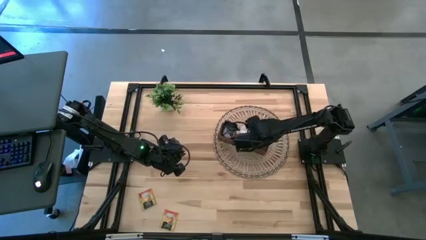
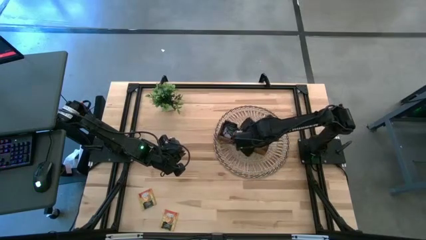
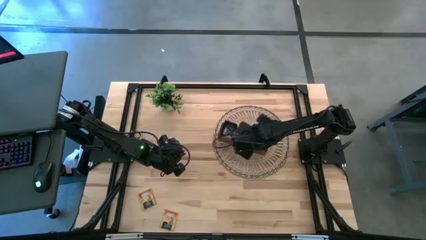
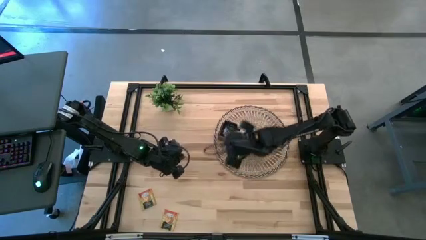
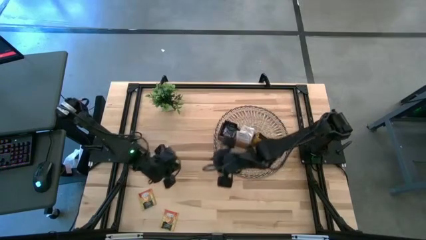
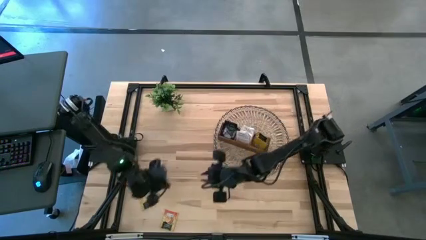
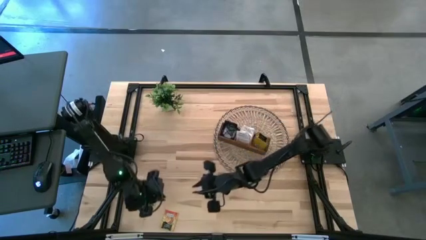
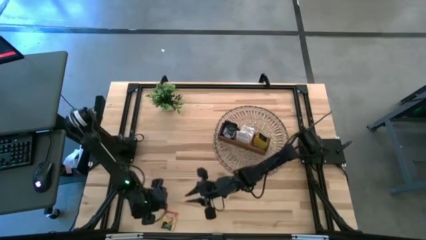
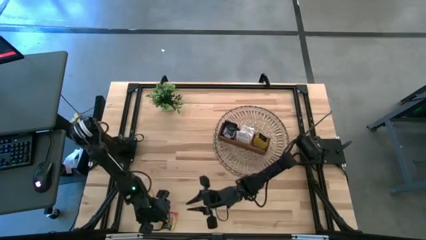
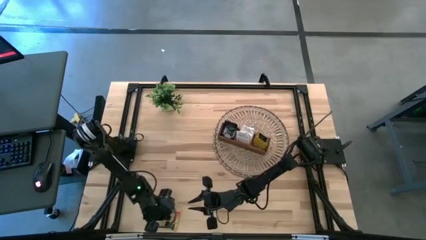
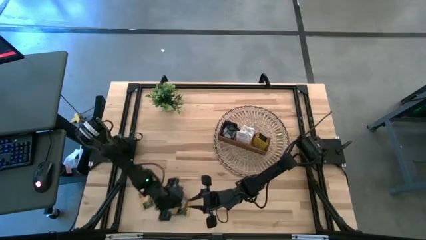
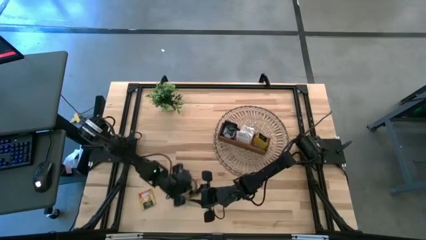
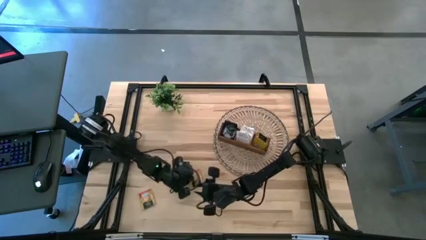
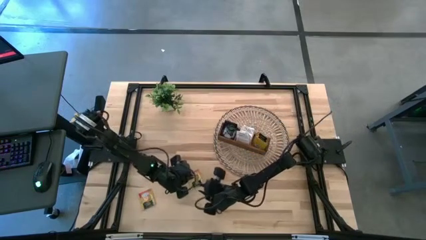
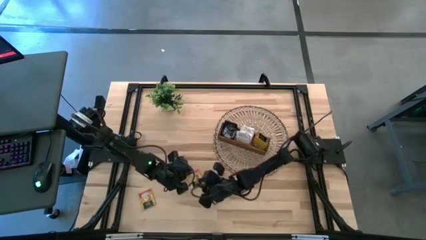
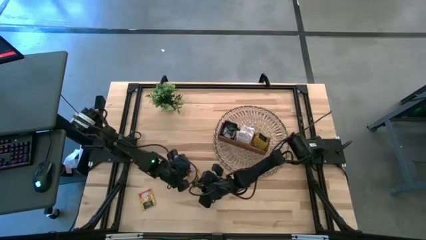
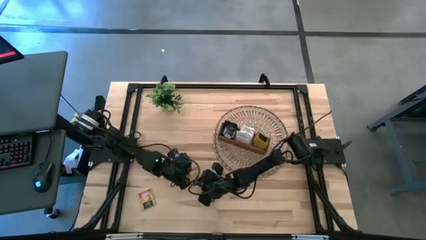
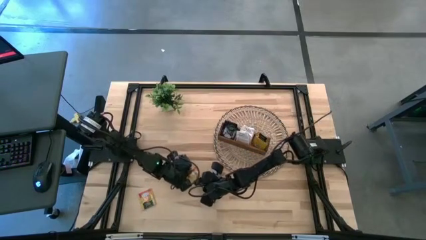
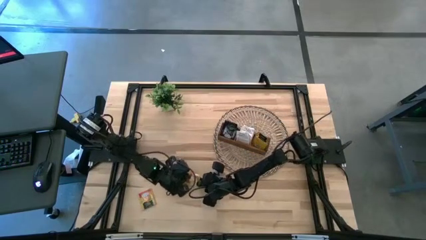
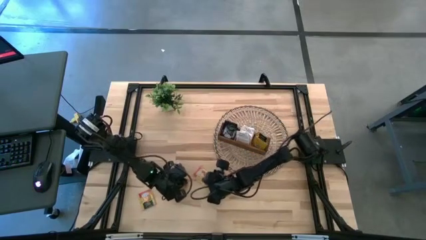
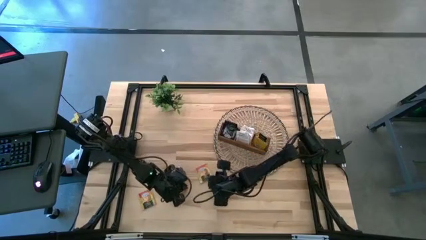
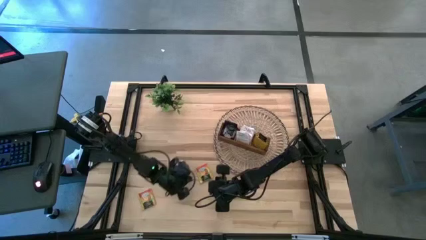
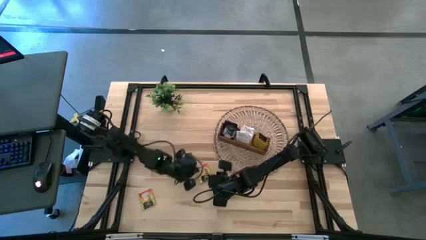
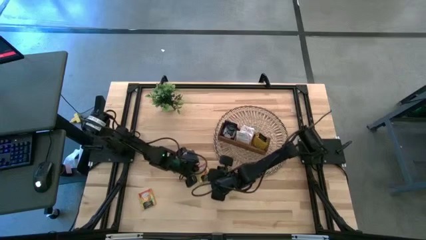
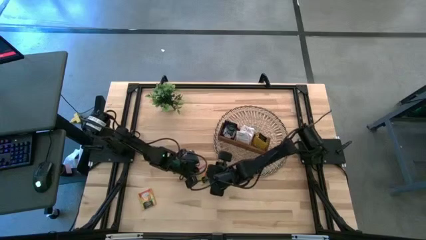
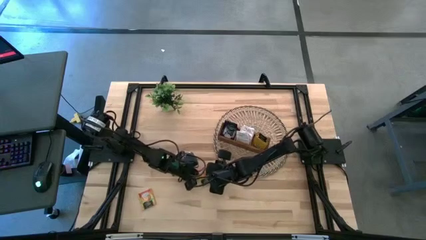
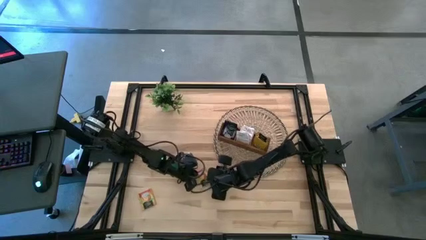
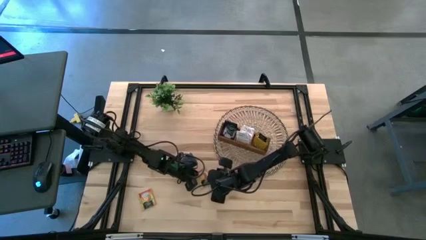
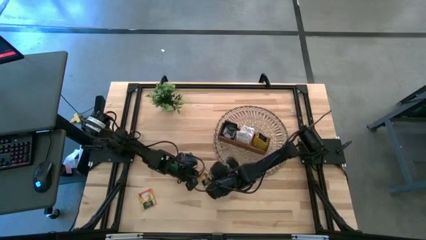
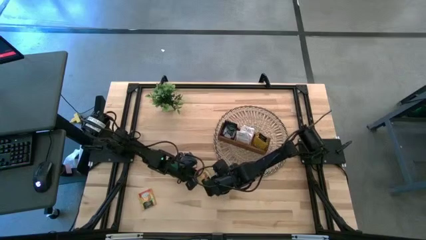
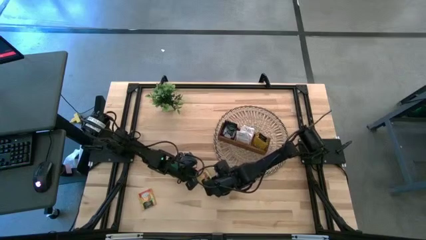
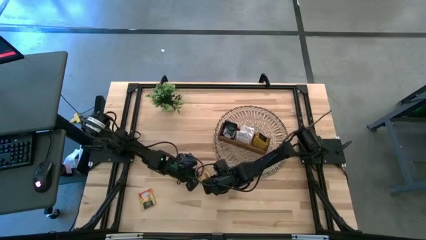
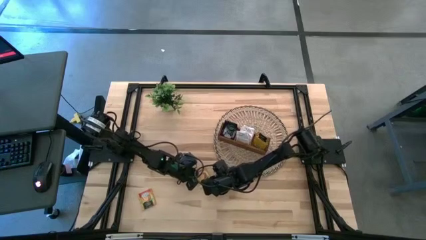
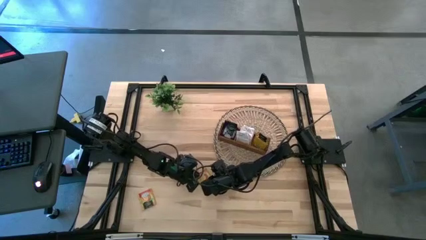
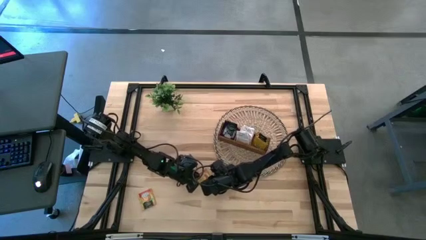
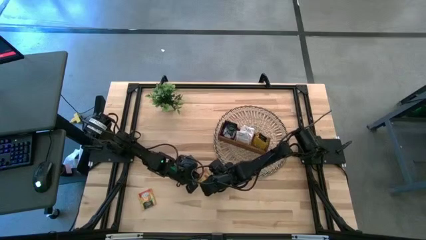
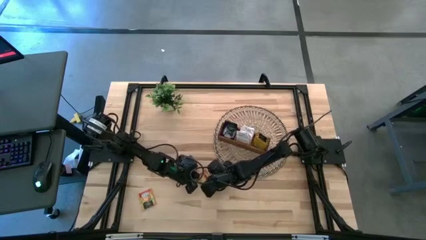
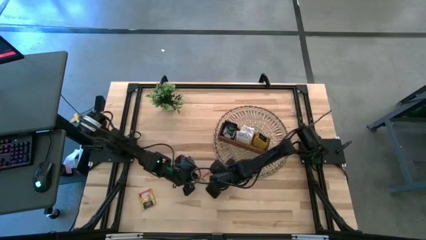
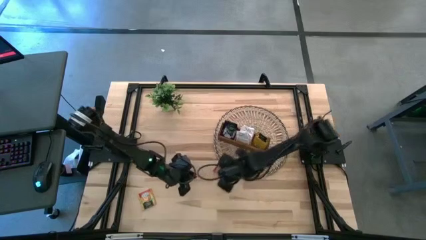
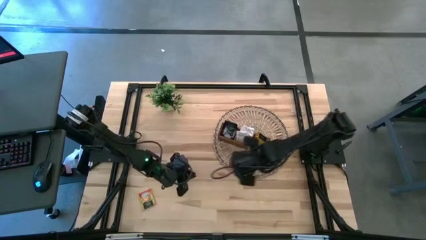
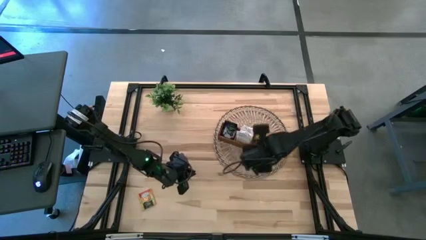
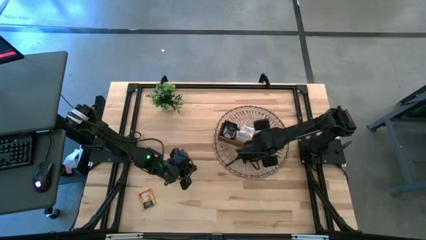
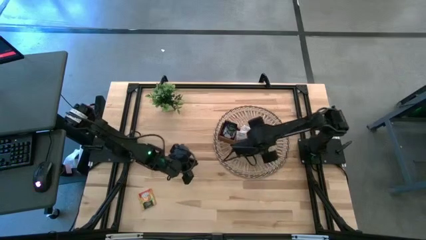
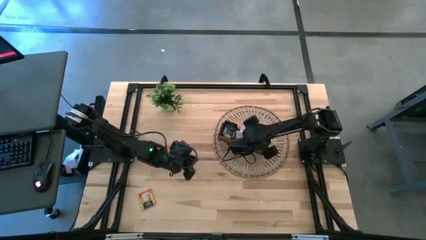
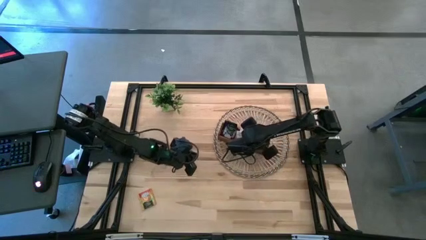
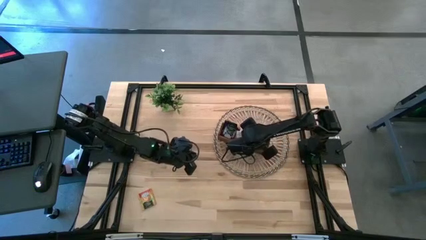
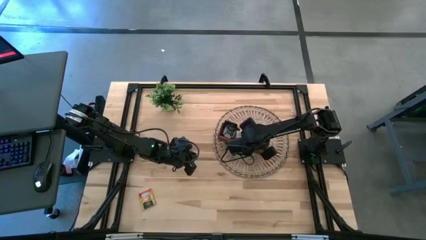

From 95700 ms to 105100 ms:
Task: Pick & Place Tea
Put the orange tea bag into the right section of the wooden organizer

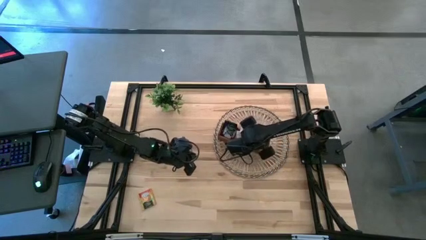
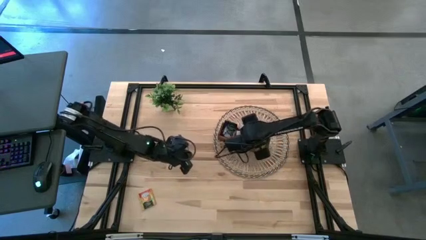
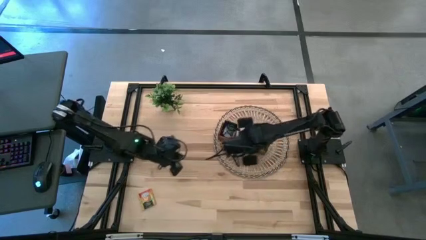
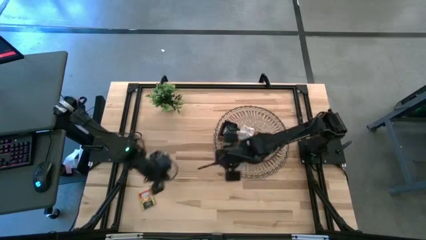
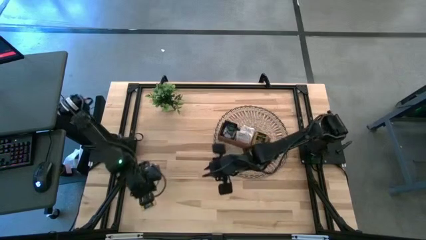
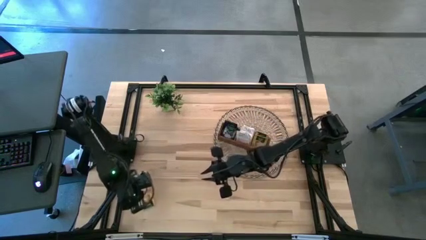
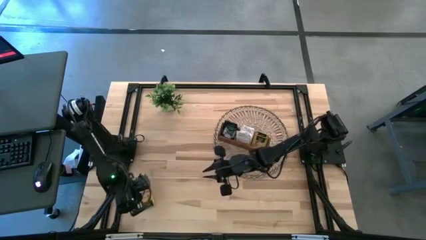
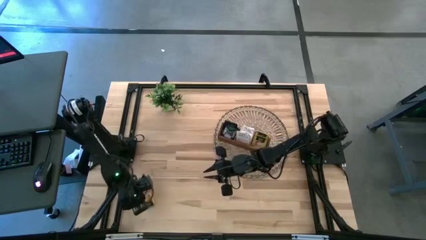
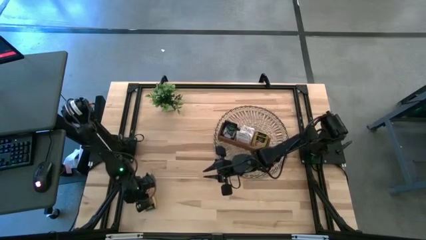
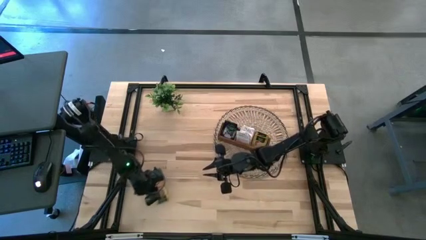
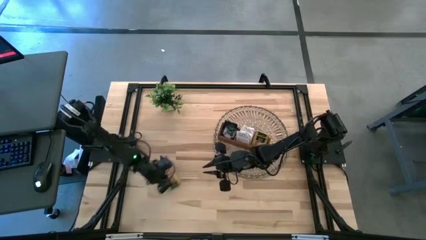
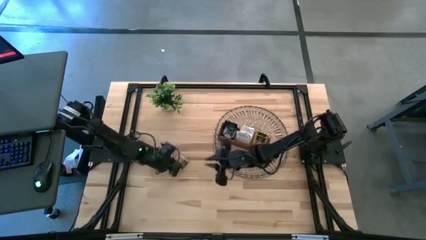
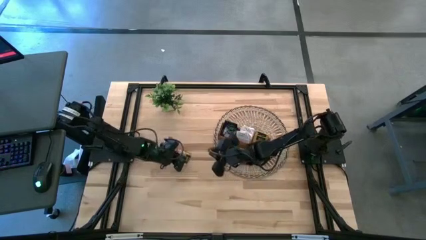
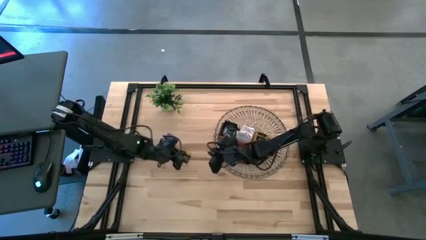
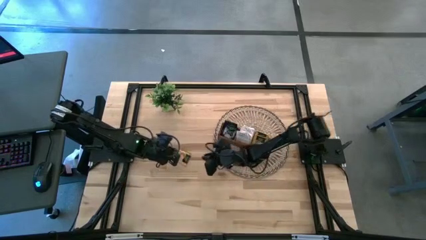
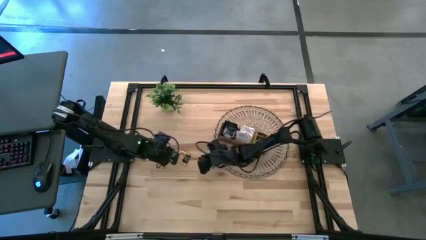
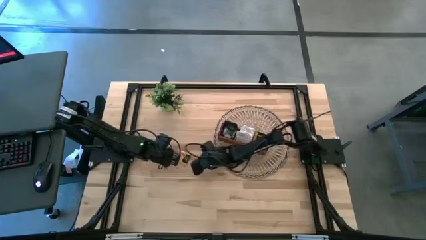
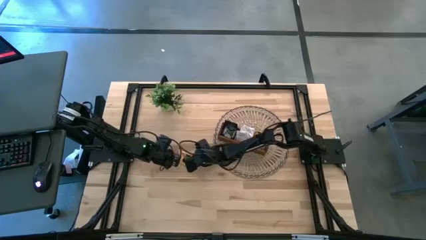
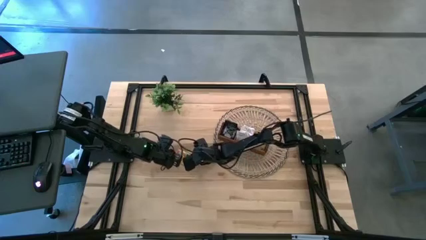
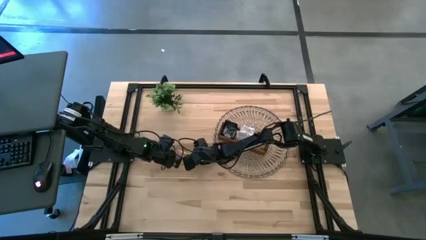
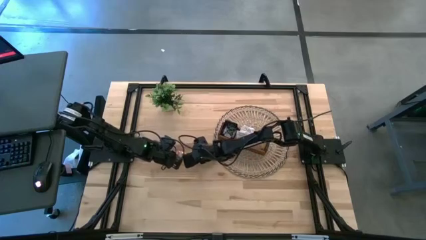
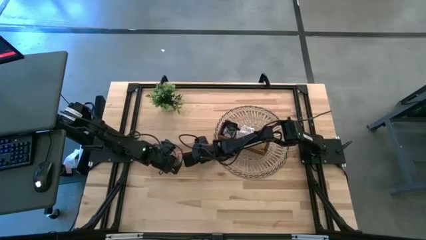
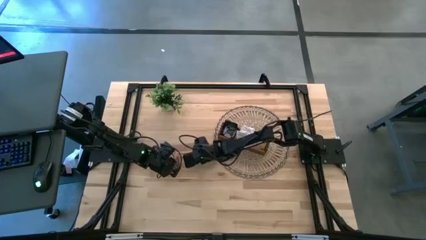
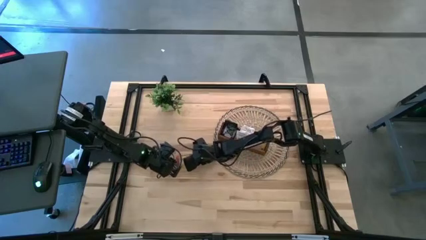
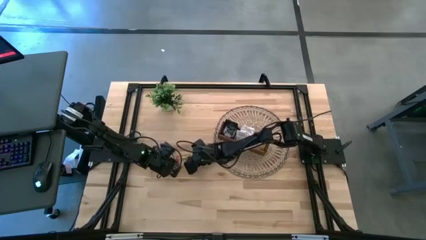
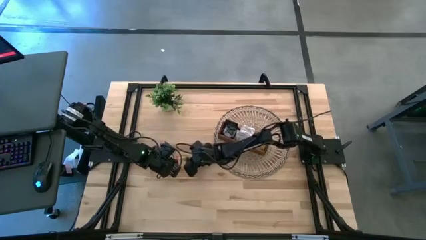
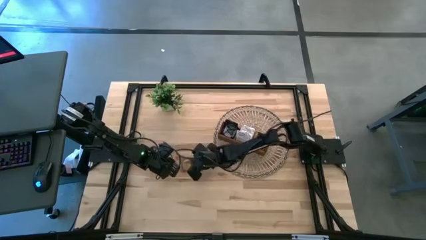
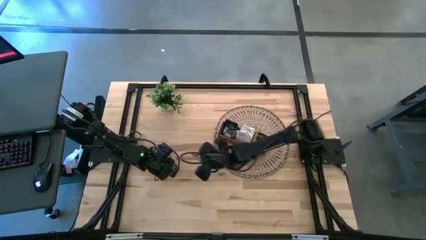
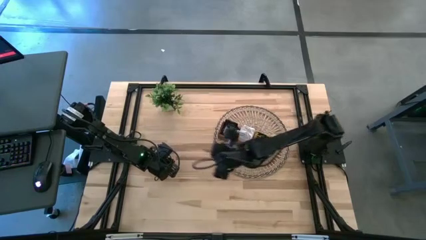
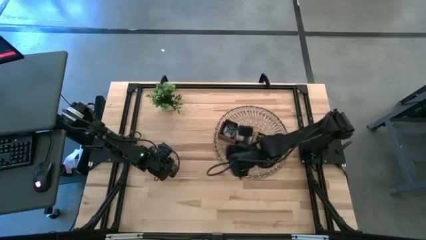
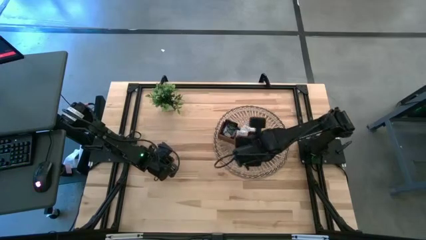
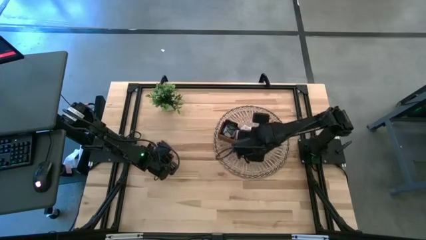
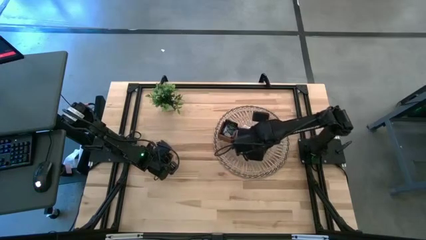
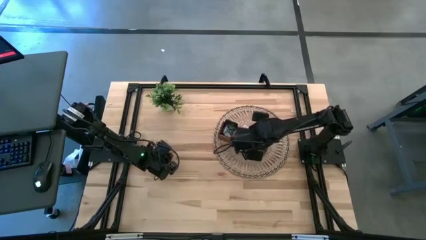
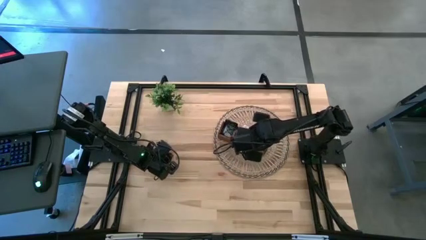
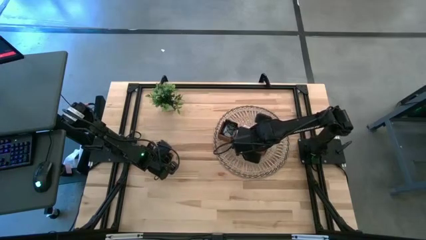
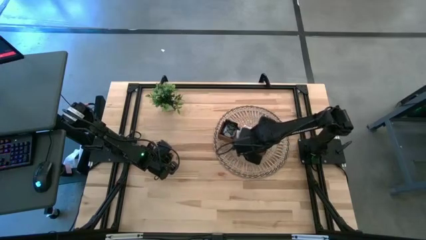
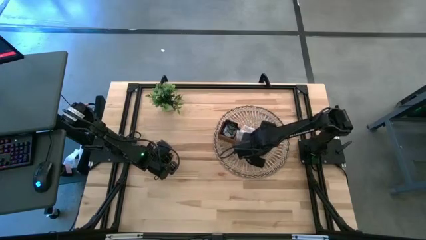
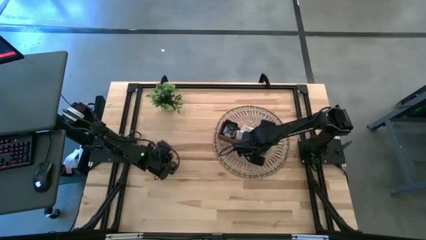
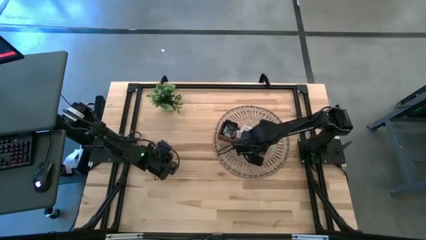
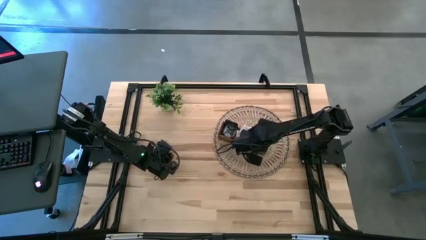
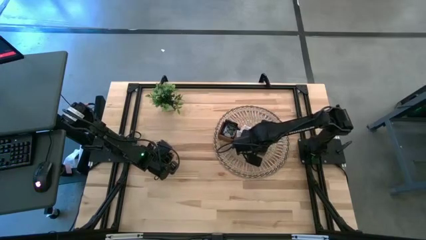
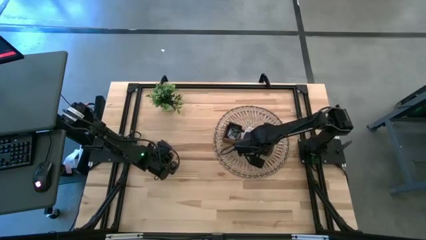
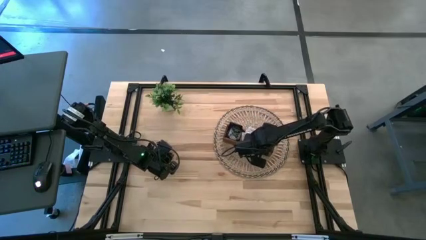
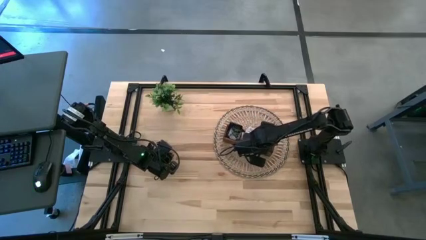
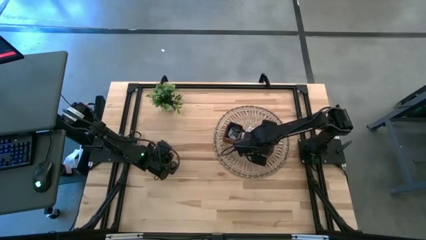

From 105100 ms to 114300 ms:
Put the orange tea bag into the right section of the wooden organizer
